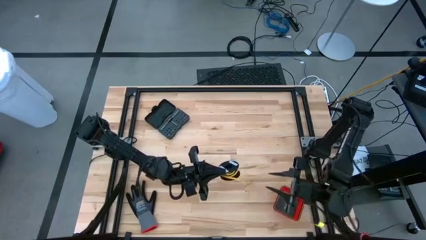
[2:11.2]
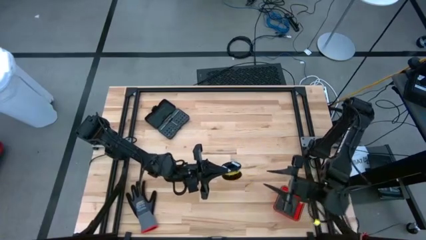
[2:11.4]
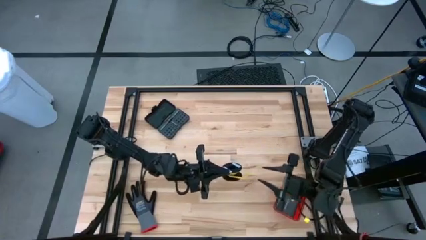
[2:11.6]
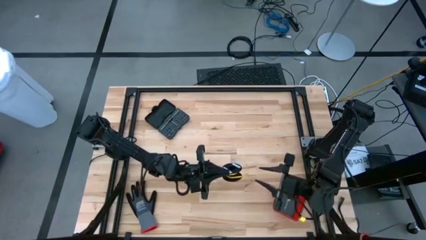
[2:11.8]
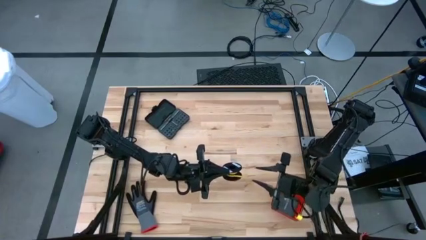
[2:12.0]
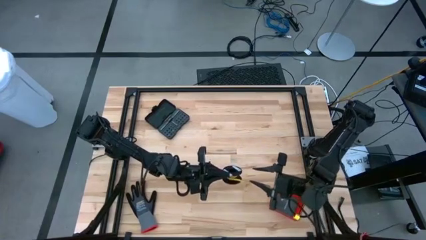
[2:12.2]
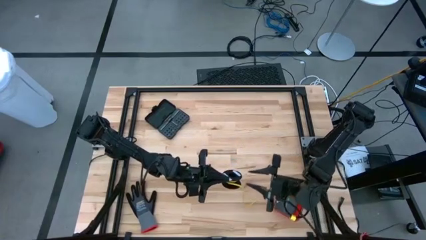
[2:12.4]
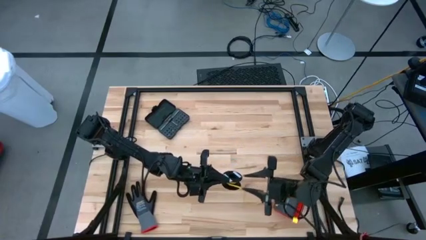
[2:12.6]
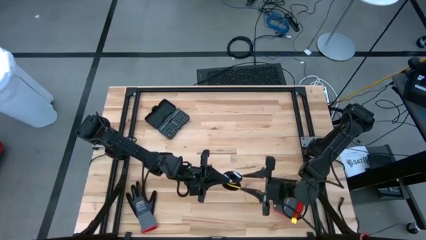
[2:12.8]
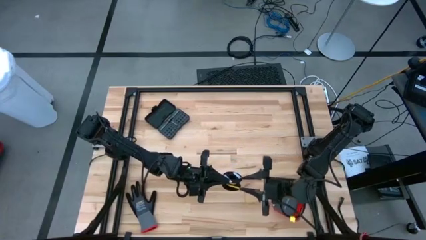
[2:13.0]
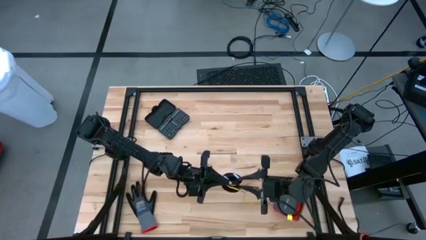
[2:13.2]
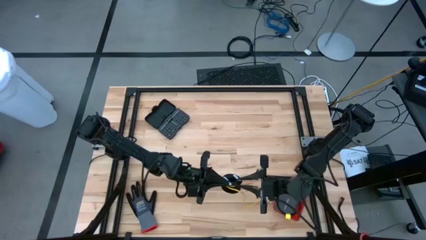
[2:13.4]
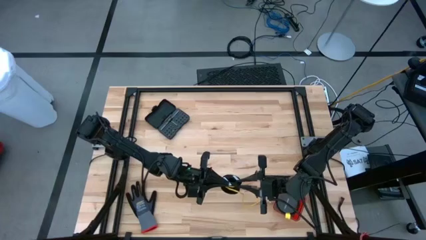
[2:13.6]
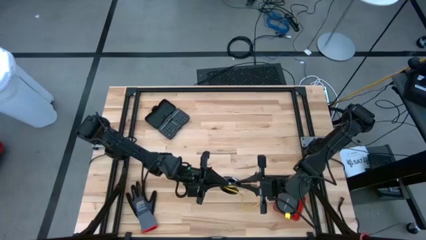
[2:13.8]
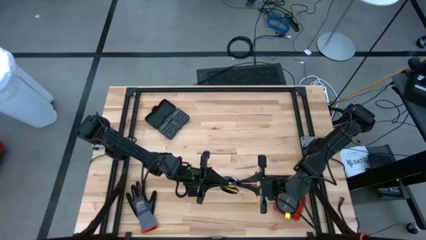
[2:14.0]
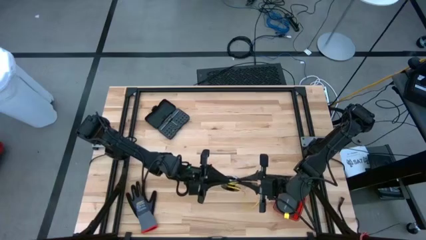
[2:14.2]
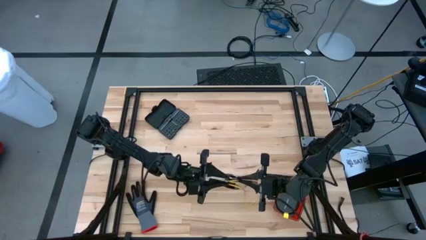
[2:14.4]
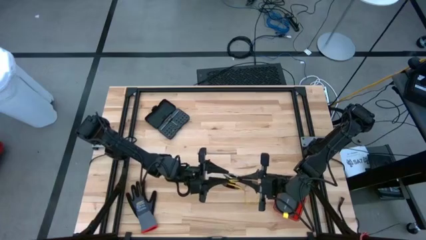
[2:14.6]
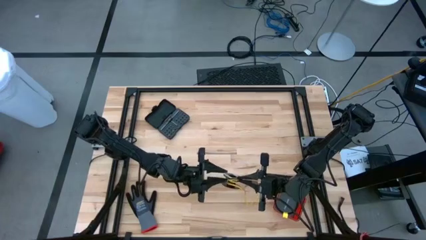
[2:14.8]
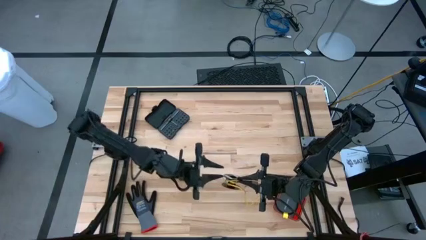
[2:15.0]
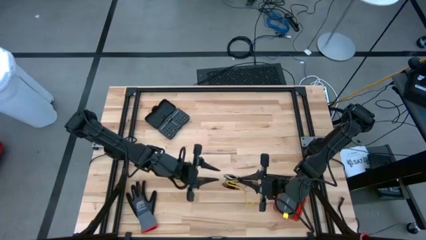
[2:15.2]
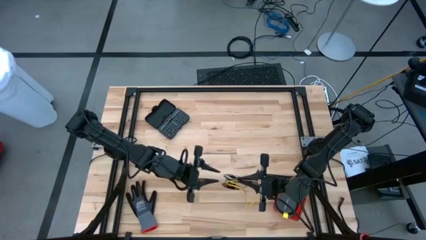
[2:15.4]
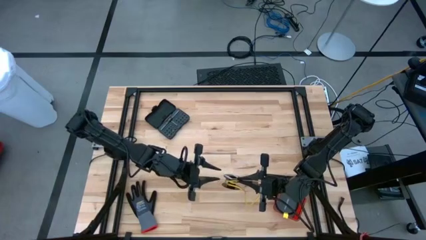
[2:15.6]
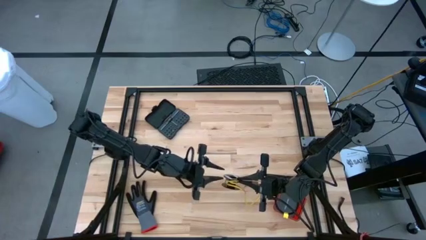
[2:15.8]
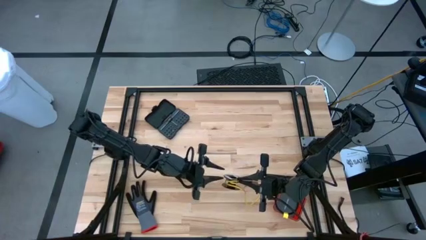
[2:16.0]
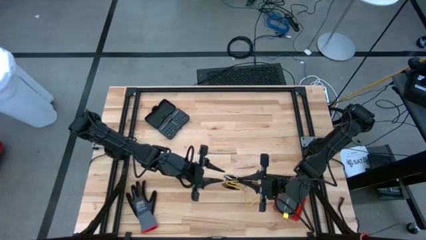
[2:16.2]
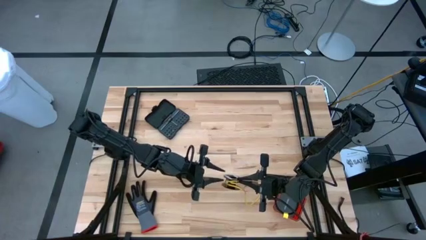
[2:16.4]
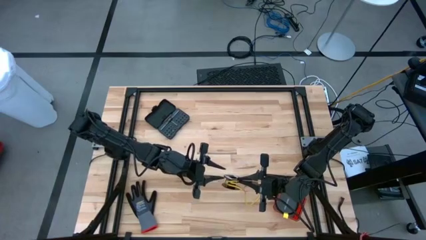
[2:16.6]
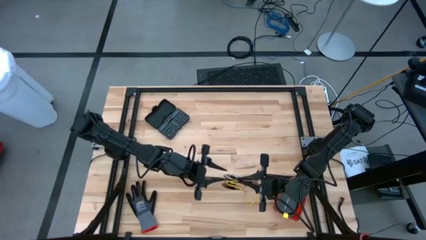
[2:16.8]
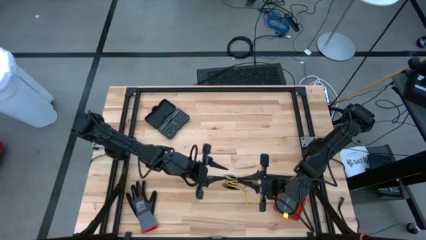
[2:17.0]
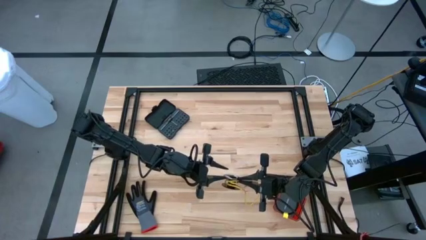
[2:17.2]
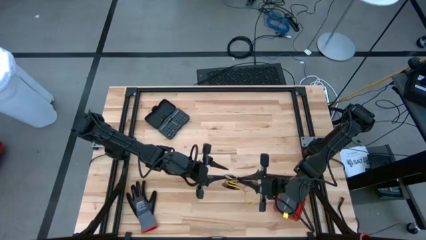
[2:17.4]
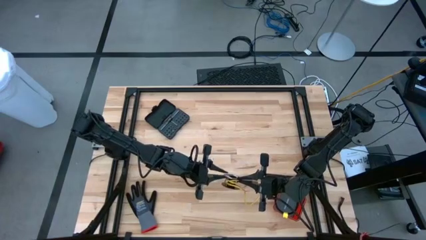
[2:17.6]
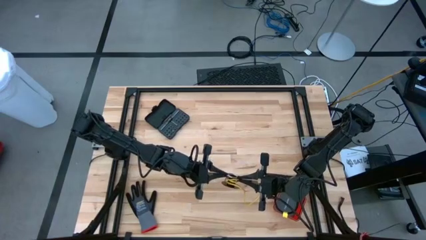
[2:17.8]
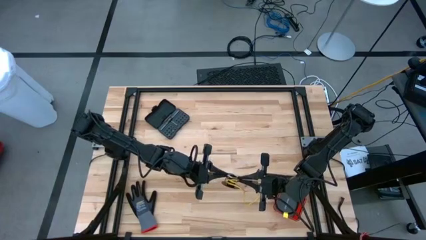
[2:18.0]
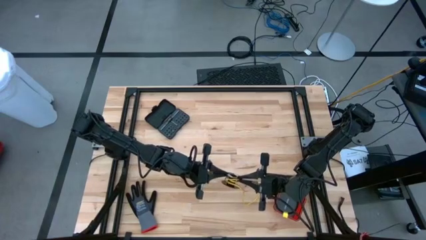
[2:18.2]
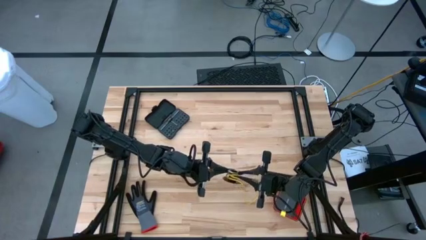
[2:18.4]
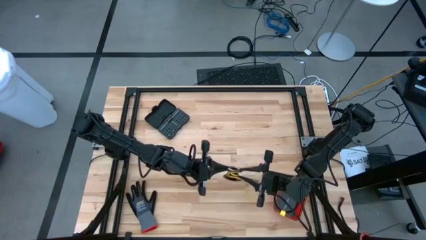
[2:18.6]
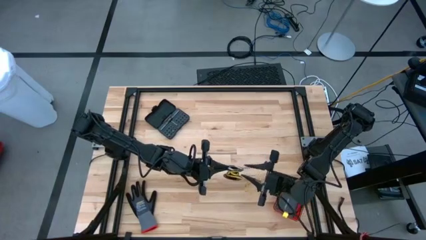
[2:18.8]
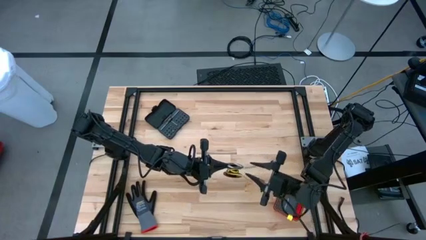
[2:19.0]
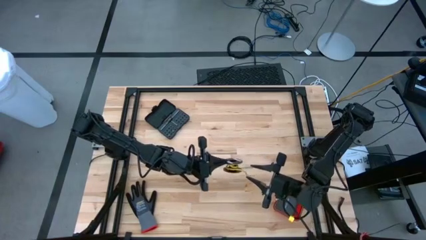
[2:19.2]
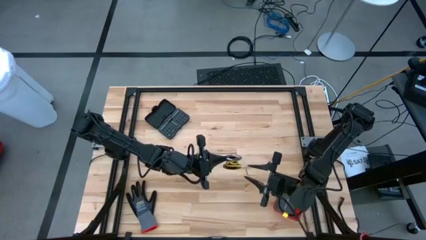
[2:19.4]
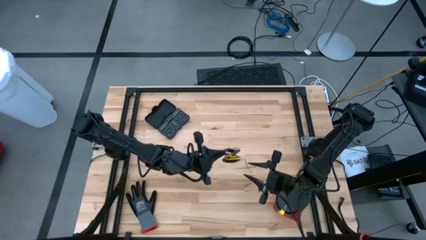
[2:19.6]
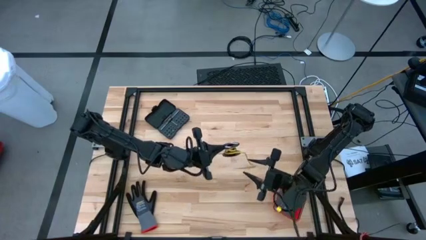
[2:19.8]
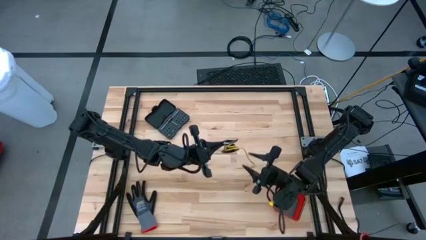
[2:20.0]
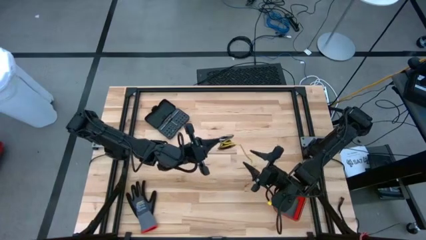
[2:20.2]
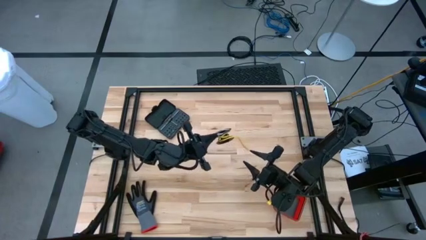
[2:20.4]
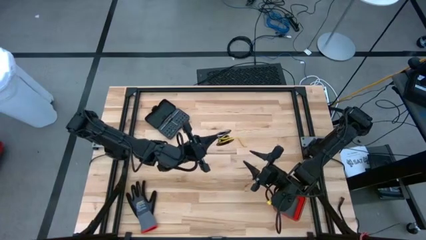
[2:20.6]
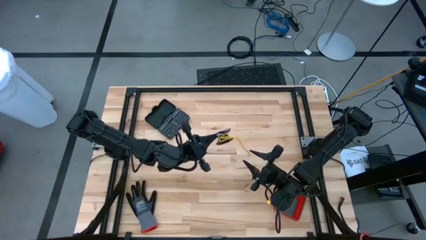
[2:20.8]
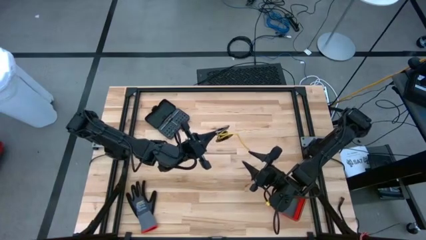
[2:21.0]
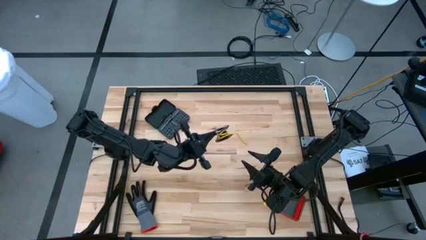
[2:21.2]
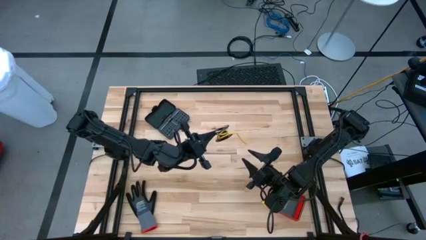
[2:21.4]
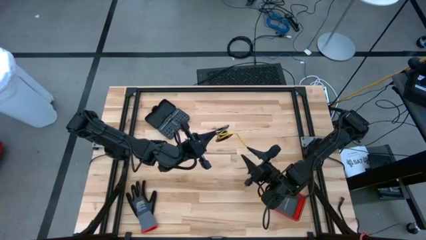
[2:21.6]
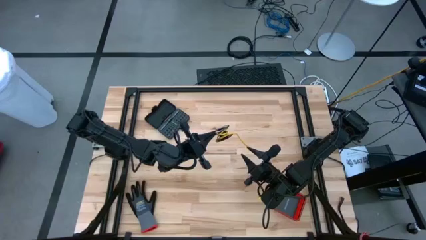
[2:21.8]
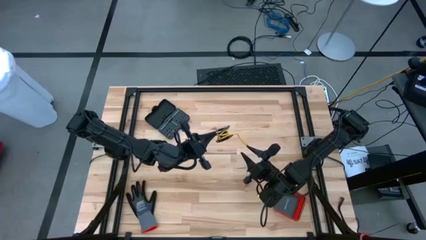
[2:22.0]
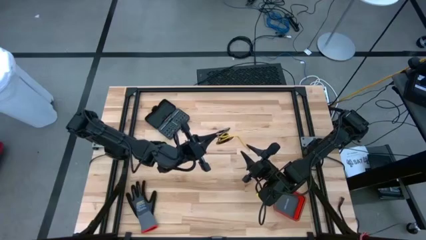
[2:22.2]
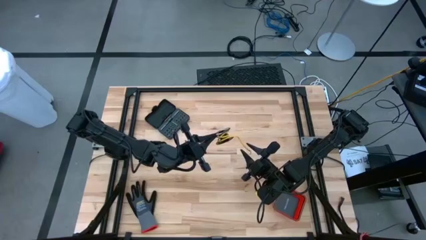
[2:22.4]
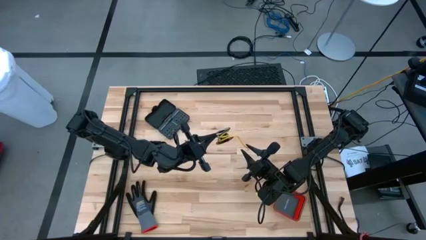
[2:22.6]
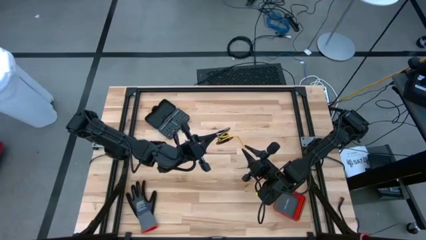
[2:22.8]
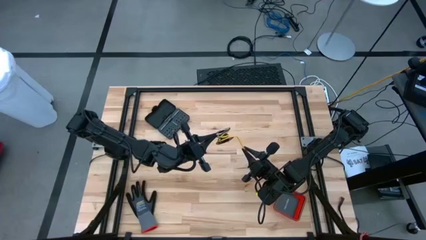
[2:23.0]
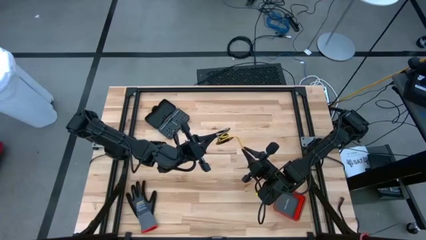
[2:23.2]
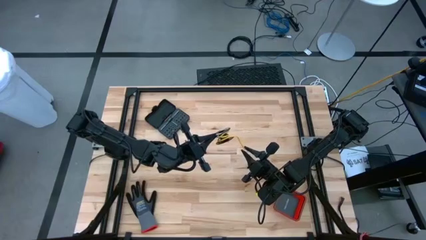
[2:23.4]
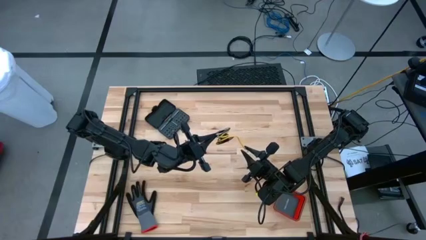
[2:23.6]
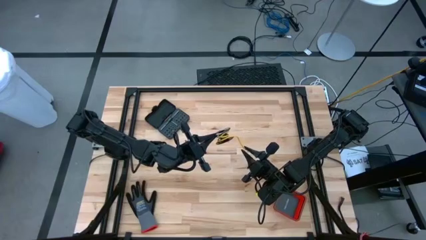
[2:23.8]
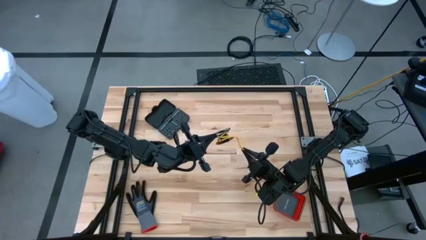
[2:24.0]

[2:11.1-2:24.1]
Task: Coil cords
Coil the yellow wire onto the spool
